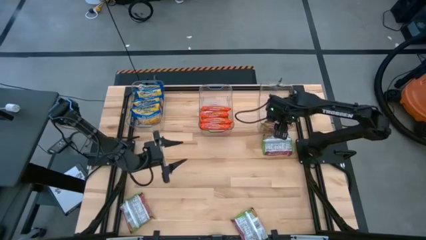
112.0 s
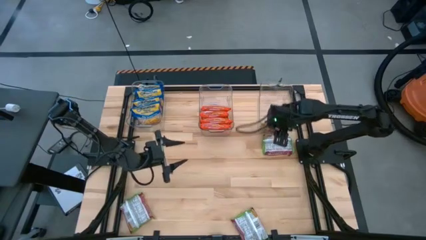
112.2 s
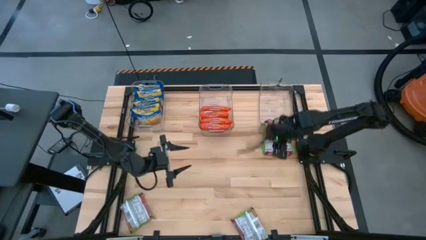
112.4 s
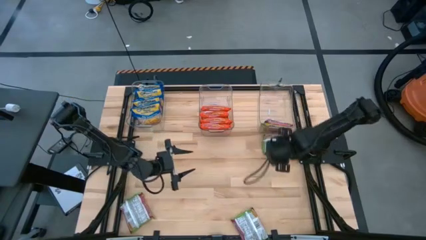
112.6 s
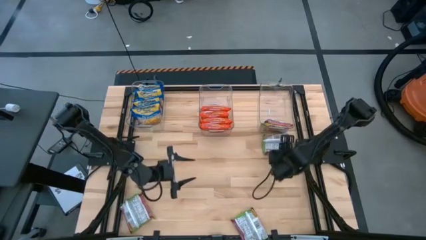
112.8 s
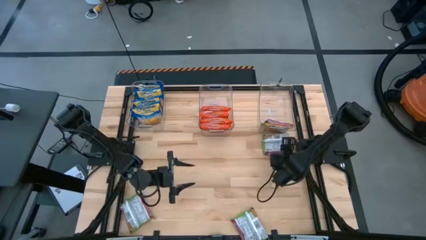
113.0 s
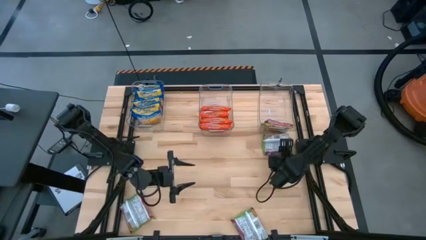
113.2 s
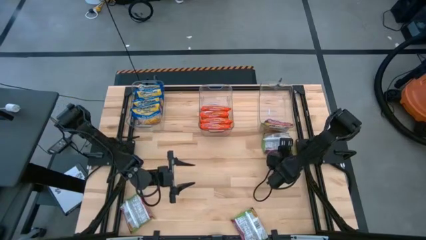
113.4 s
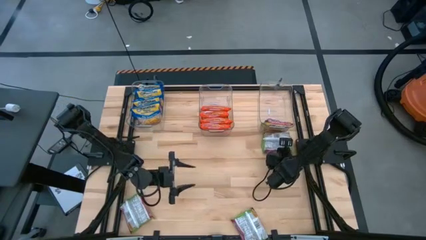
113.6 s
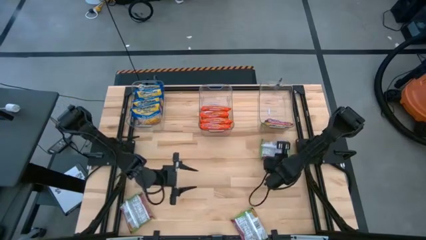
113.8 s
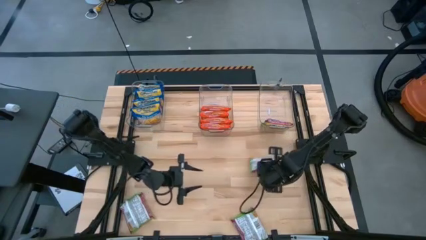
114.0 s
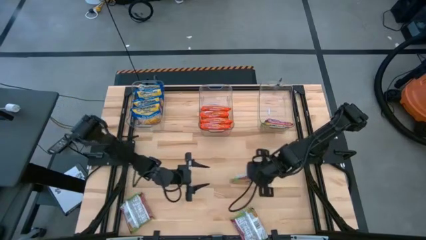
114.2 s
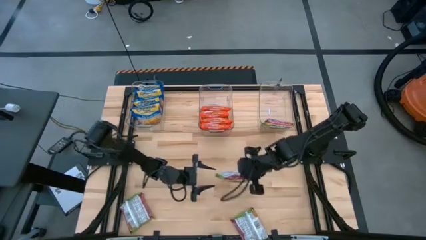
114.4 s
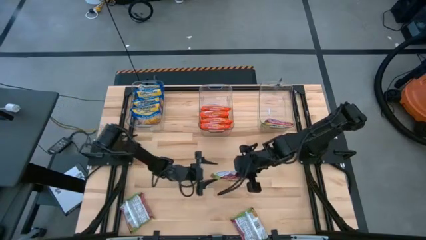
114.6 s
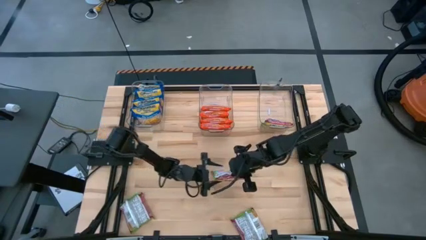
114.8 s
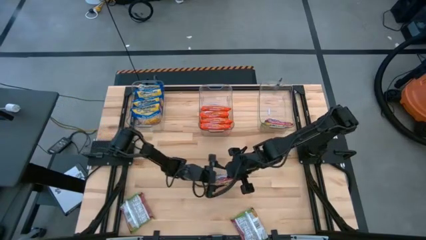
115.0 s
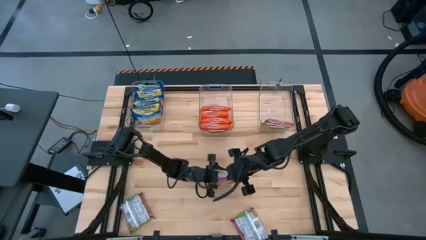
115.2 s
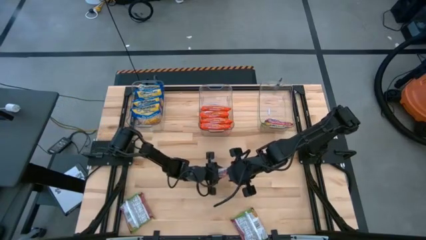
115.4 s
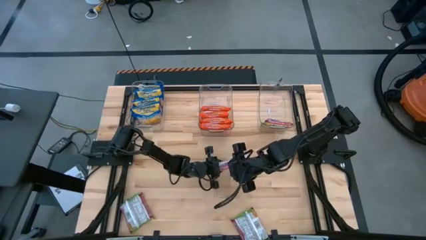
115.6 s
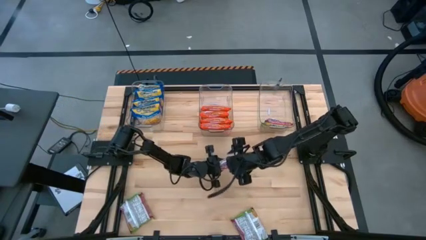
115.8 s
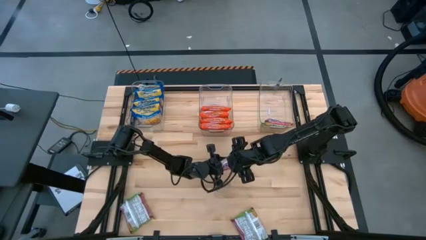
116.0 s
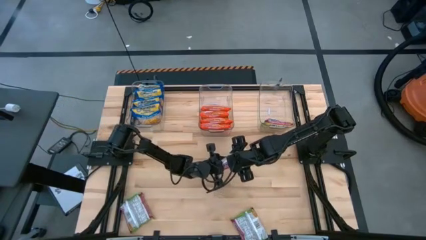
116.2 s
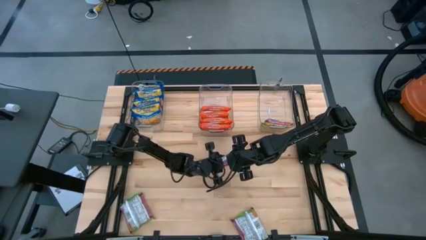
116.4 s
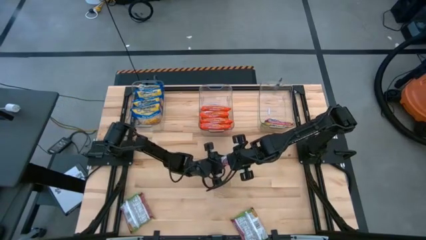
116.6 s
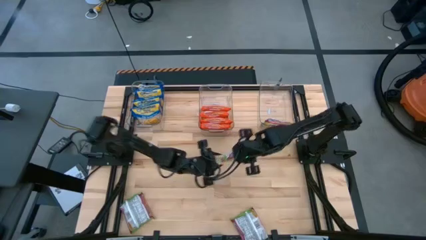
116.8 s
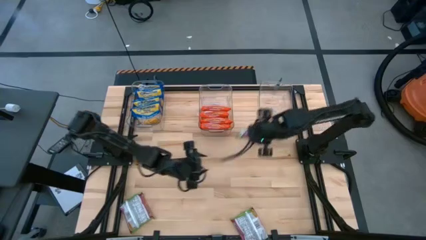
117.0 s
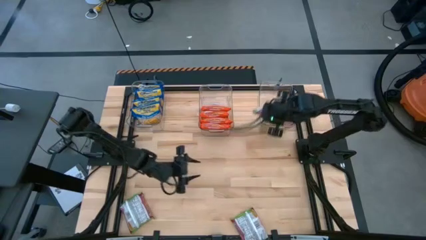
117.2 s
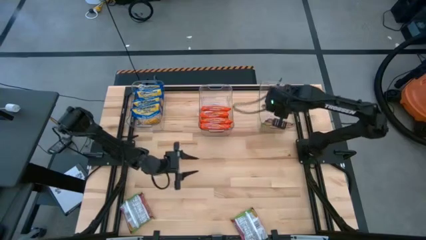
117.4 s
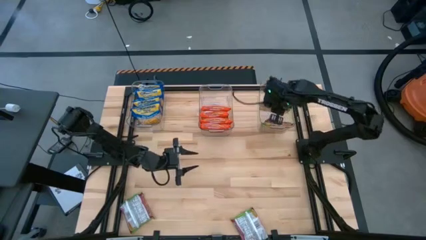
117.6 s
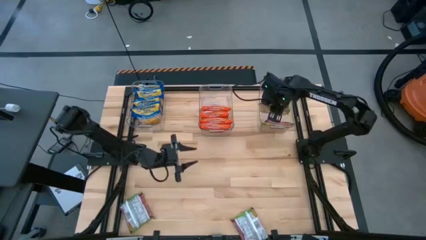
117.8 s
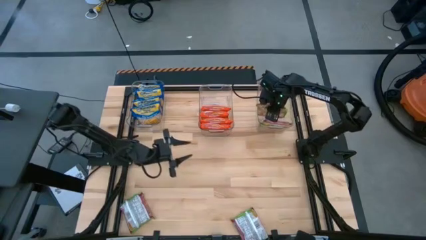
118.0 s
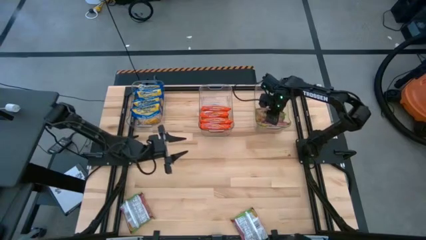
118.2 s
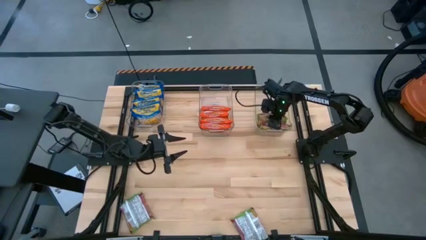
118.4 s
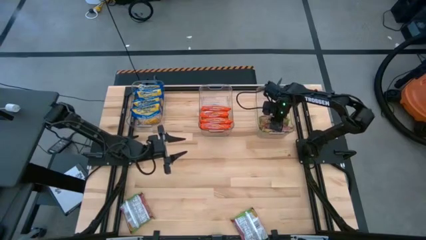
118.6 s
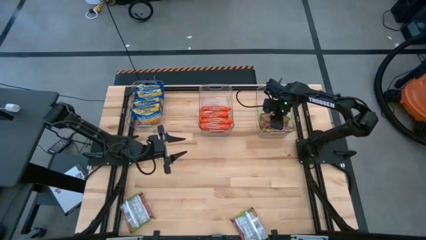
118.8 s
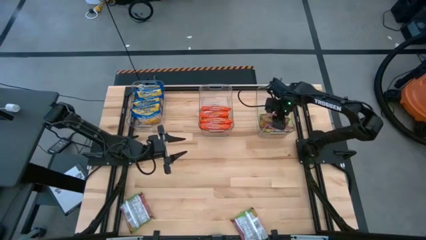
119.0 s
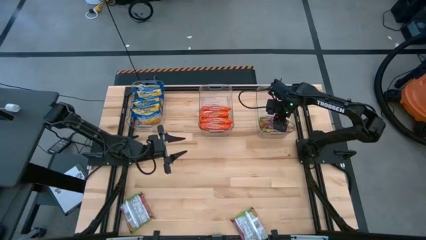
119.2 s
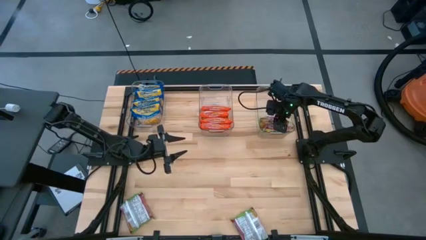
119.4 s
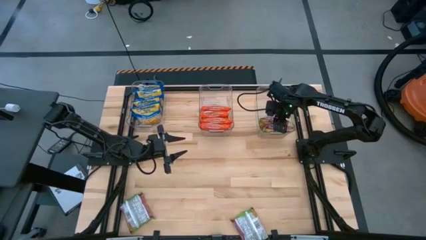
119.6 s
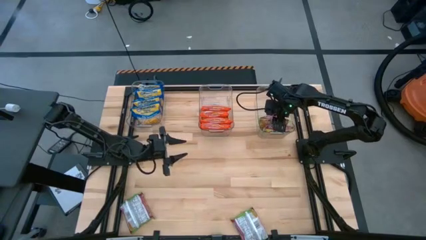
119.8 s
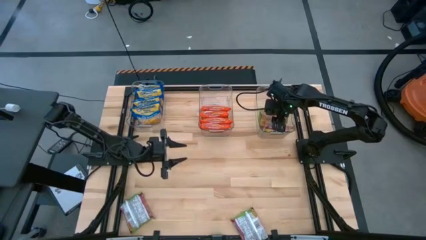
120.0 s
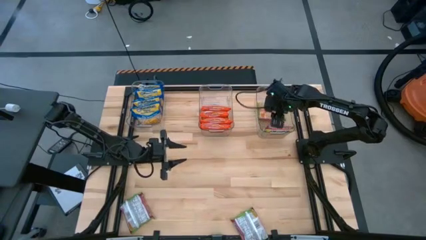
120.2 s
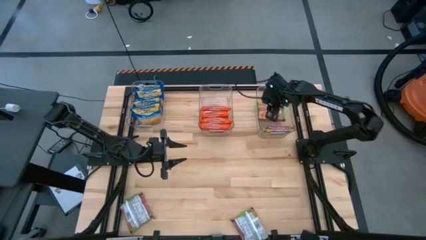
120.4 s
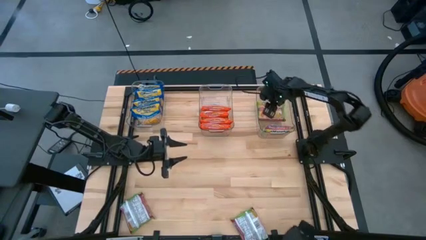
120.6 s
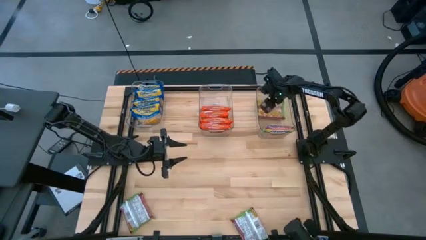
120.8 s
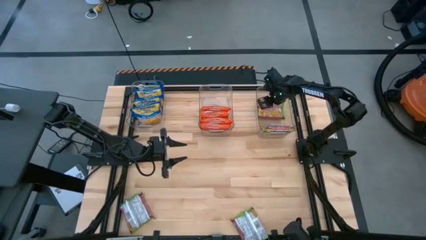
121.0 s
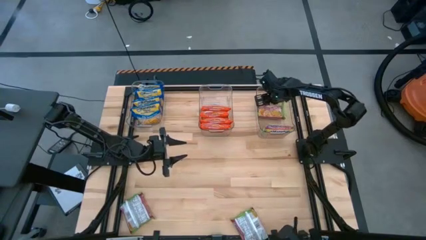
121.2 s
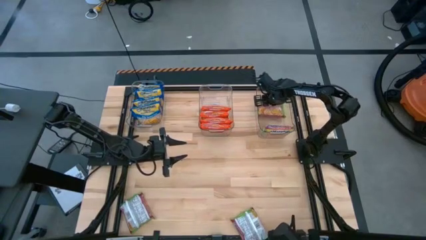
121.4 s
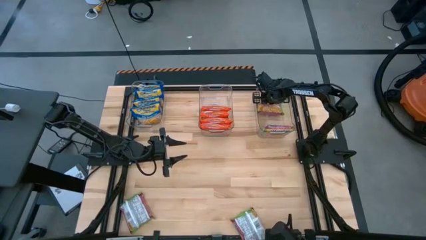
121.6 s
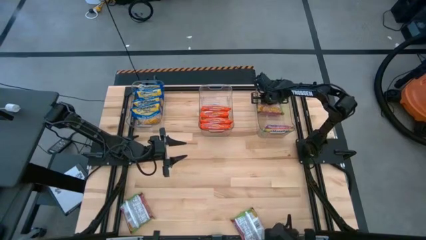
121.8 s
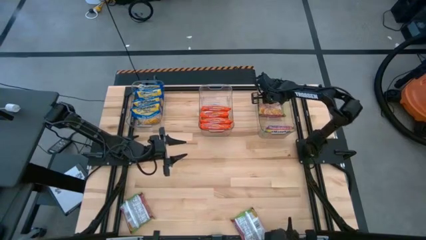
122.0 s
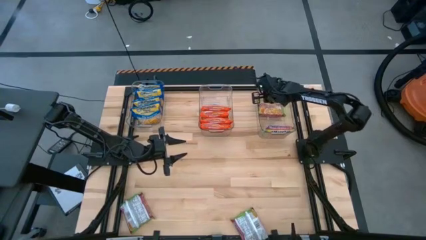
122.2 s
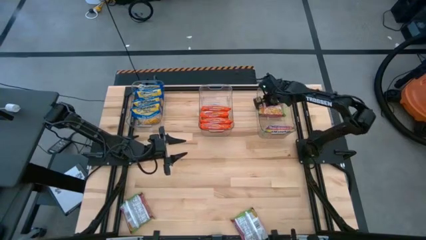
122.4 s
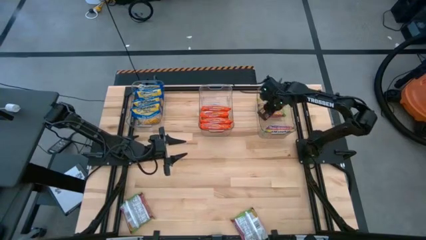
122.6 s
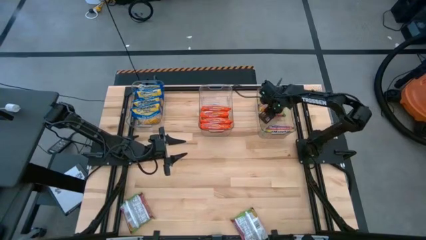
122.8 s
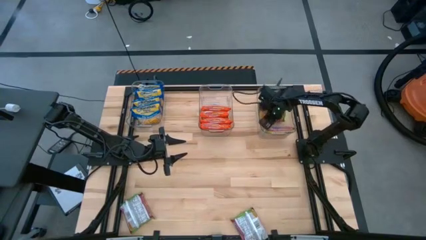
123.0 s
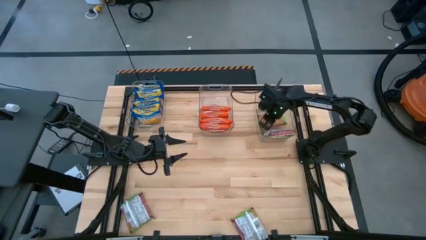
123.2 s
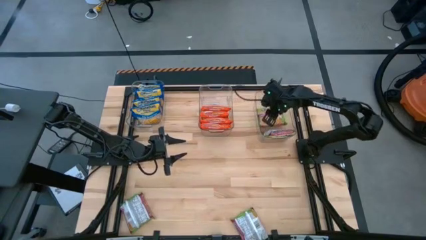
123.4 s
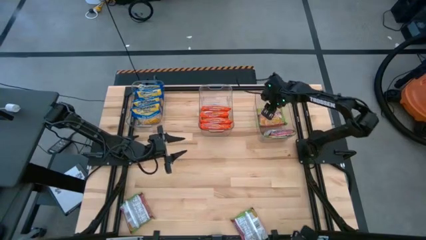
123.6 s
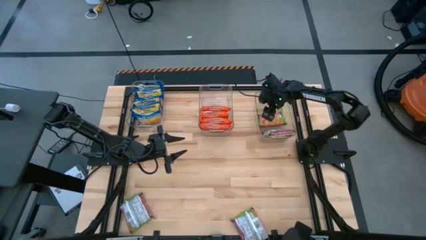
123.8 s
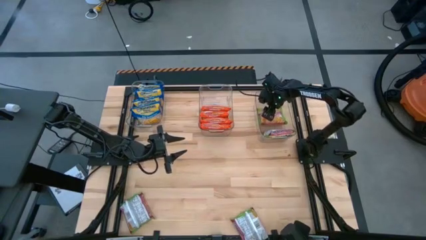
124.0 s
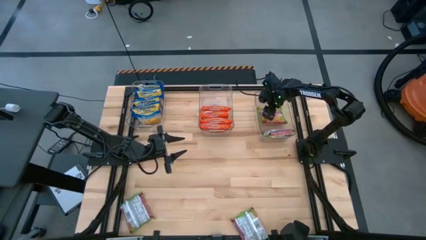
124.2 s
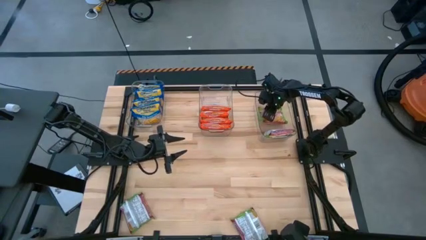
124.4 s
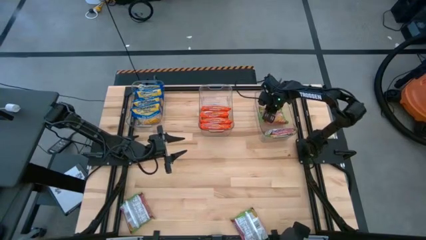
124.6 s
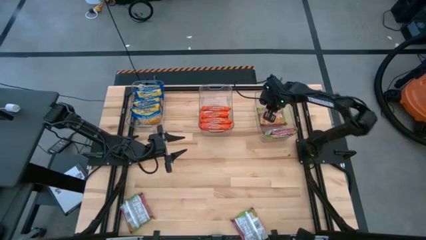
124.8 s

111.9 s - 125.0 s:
Task: Sort Maruchan noodles
Put the green noodle pack into the right transparent bin

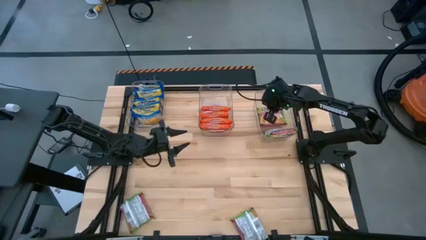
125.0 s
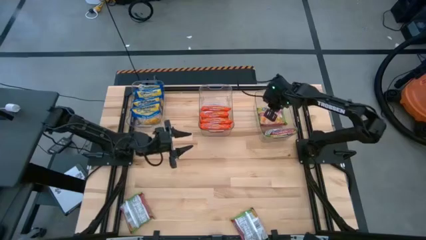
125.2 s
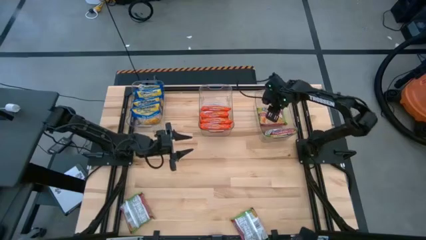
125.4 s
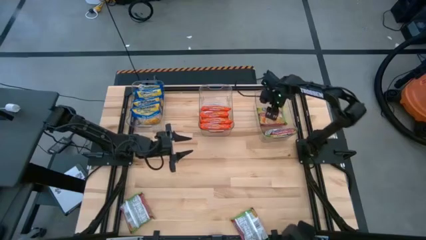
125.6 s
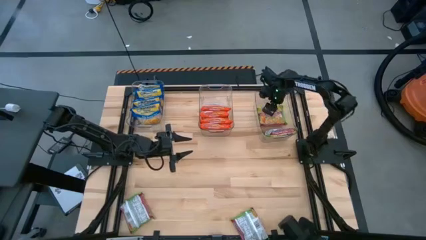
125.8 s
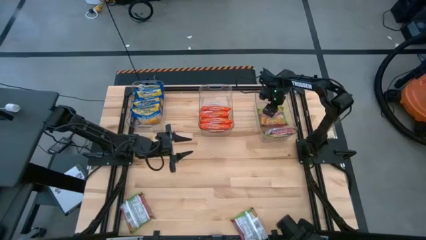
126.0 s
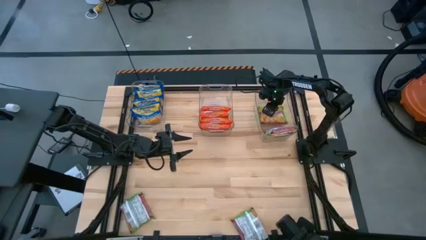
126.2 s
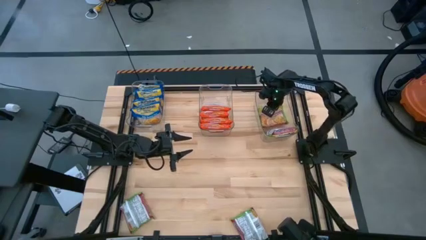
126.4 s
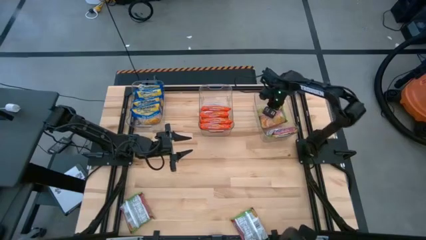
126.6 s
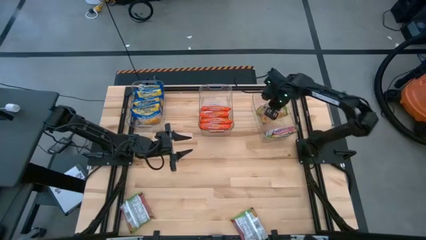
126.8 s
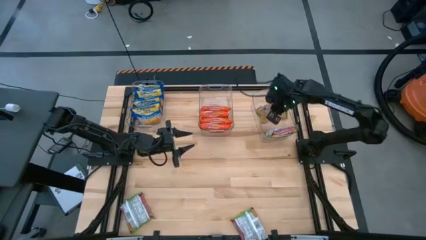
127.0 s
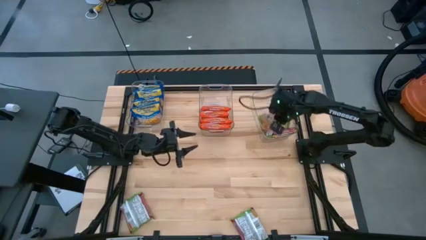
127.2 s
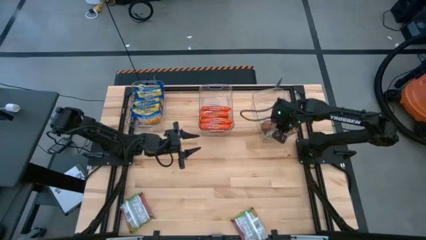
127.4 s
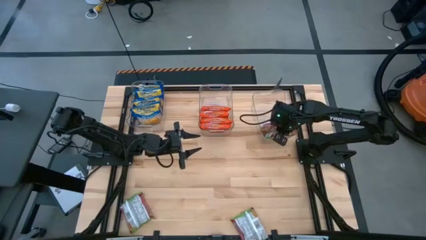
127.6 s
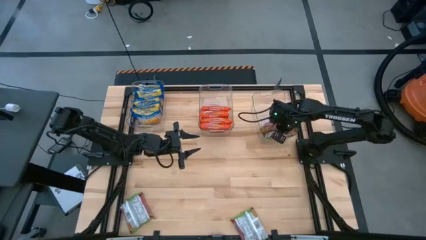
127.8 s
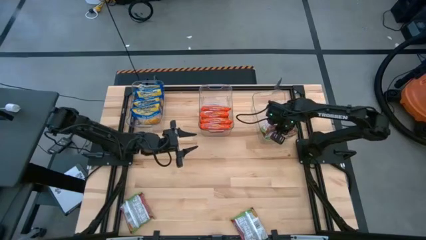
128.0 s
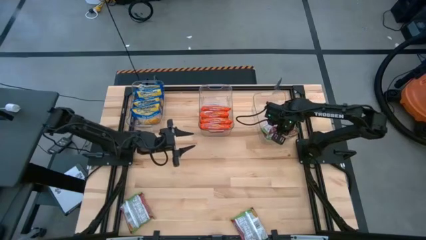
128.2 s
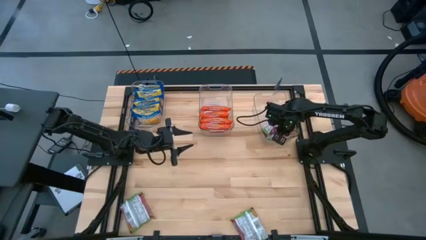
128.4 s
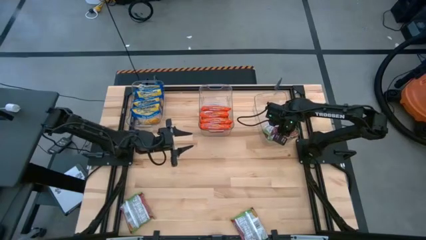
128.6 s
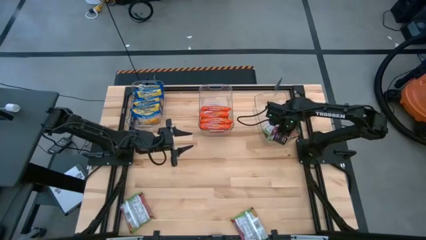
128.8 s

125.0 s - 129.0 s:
Put the green noodle pack into the right transparent bin
